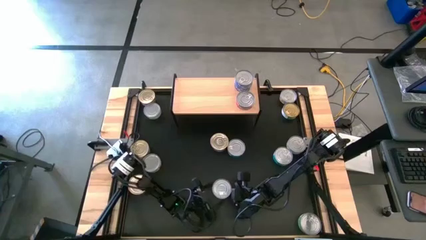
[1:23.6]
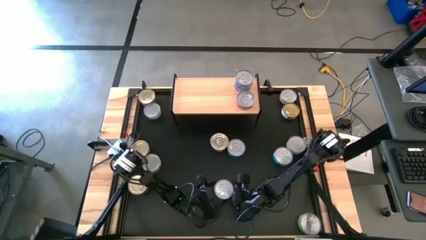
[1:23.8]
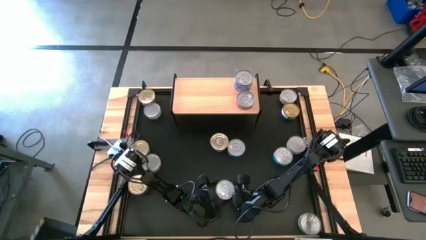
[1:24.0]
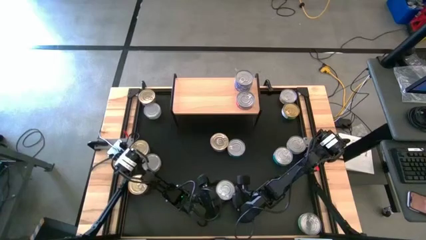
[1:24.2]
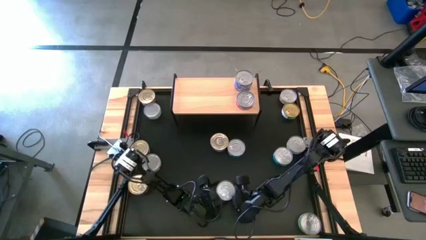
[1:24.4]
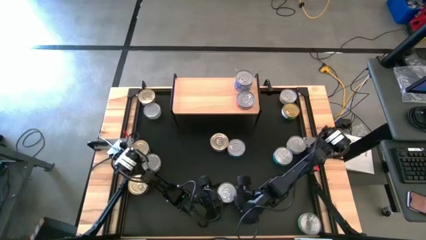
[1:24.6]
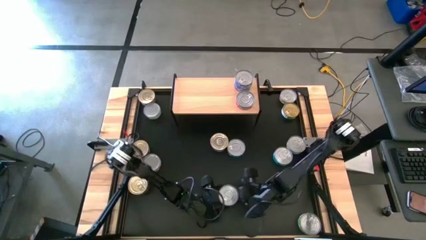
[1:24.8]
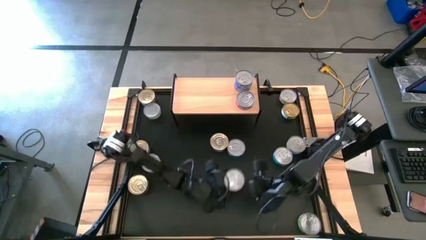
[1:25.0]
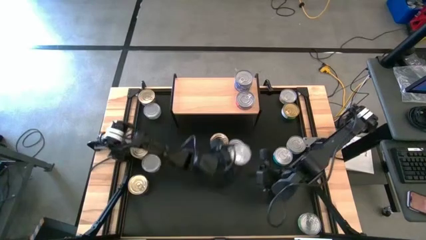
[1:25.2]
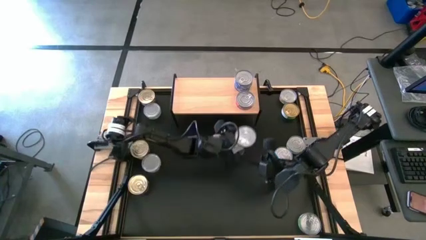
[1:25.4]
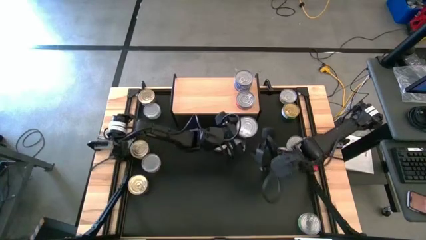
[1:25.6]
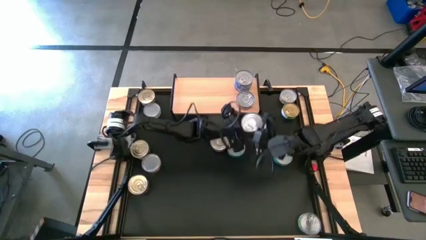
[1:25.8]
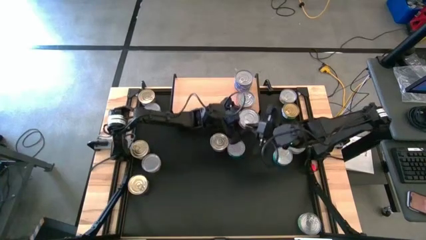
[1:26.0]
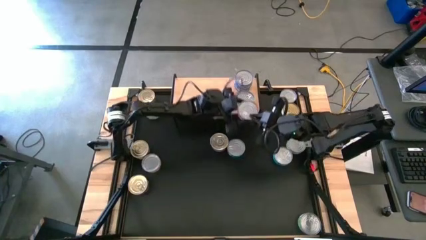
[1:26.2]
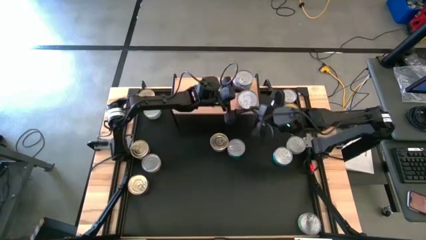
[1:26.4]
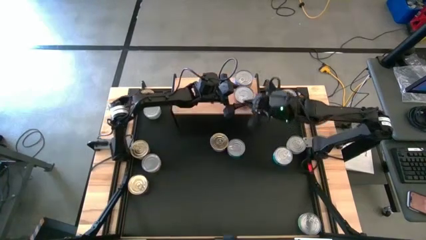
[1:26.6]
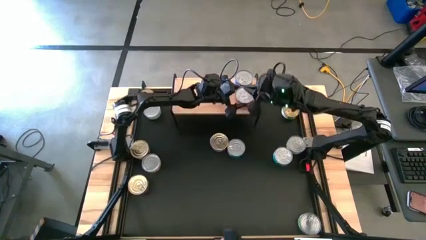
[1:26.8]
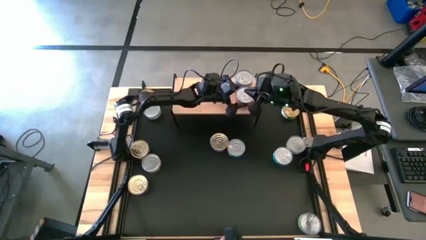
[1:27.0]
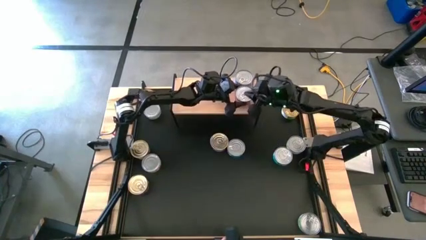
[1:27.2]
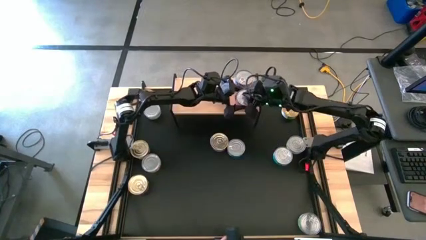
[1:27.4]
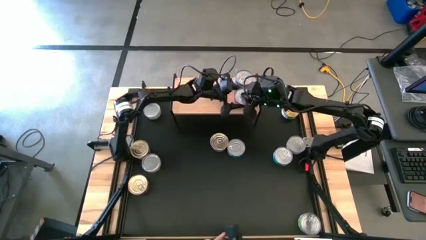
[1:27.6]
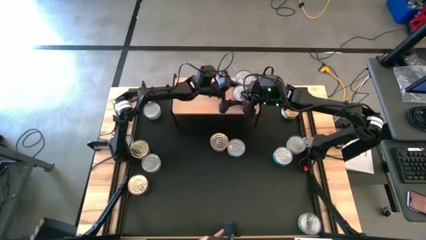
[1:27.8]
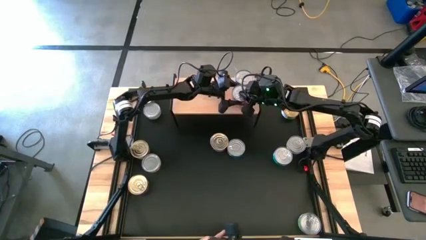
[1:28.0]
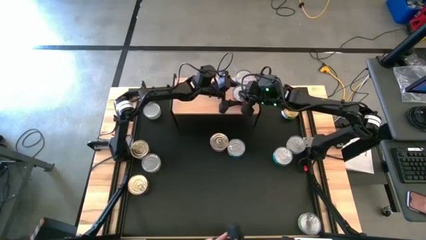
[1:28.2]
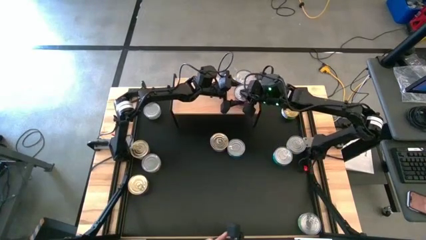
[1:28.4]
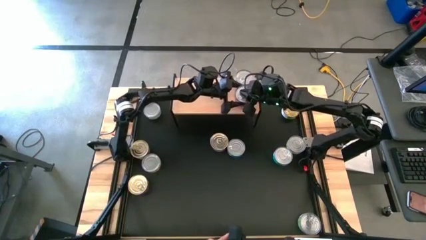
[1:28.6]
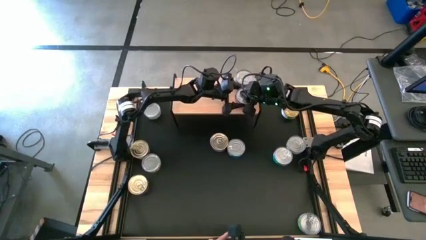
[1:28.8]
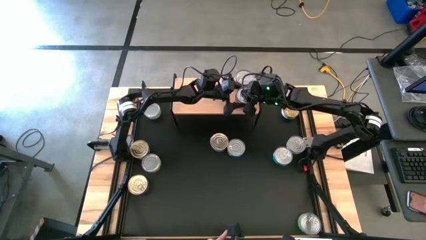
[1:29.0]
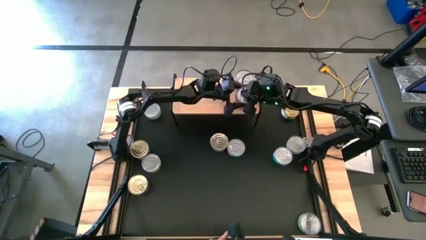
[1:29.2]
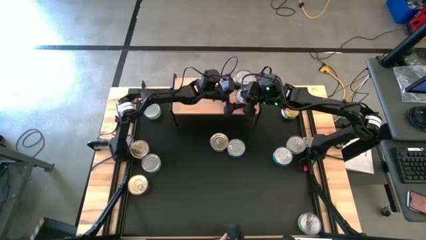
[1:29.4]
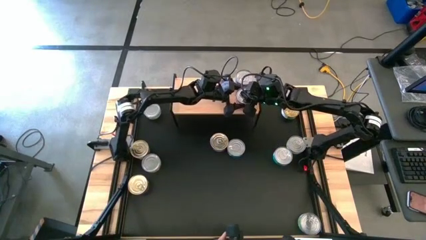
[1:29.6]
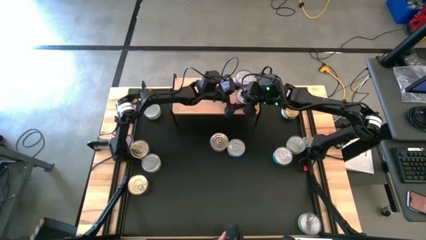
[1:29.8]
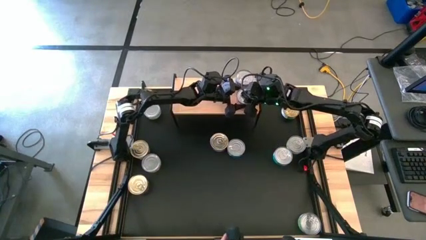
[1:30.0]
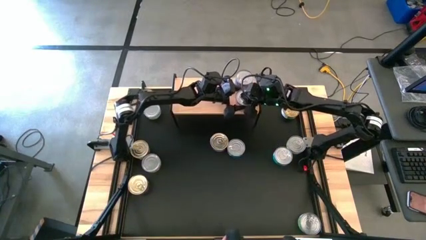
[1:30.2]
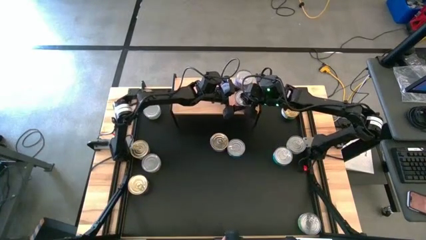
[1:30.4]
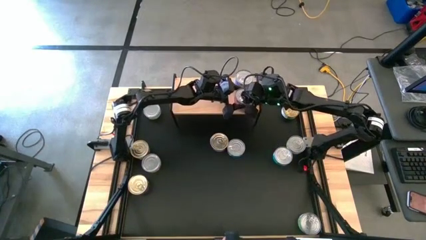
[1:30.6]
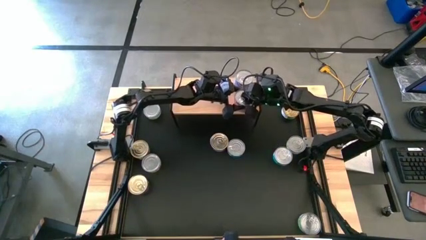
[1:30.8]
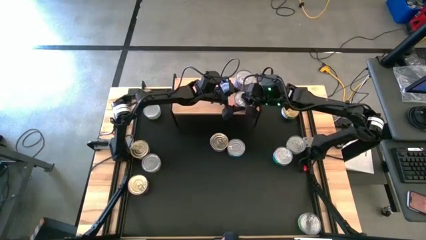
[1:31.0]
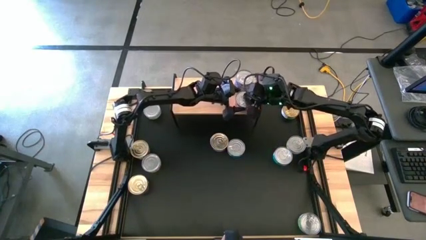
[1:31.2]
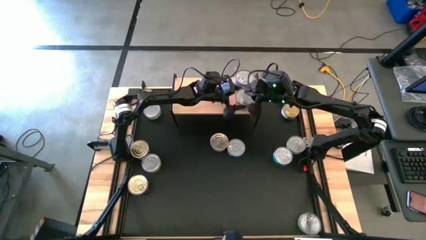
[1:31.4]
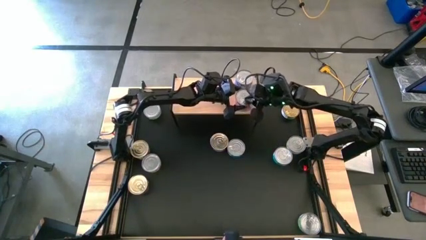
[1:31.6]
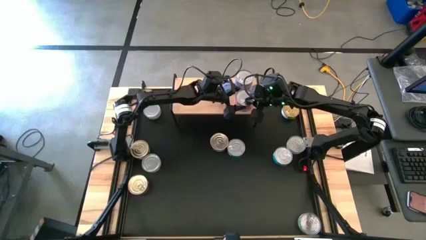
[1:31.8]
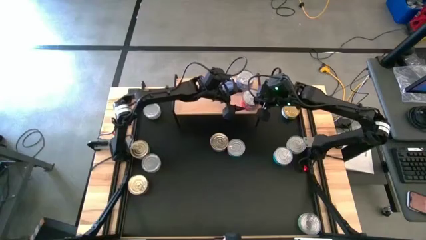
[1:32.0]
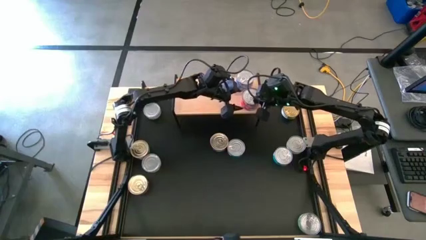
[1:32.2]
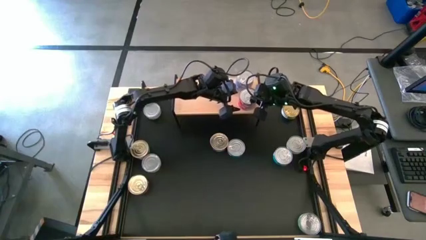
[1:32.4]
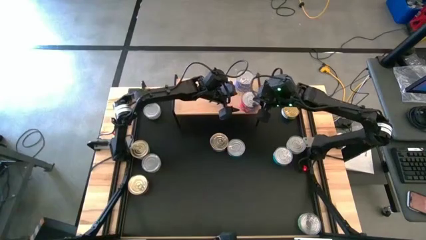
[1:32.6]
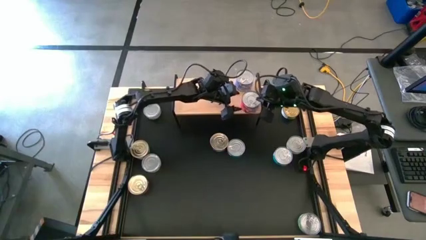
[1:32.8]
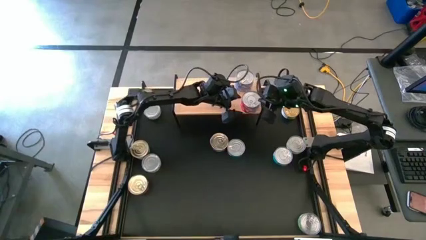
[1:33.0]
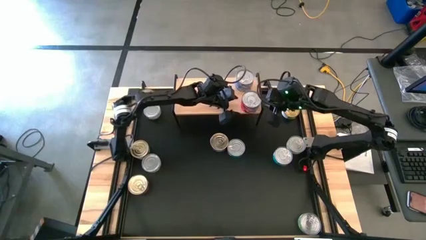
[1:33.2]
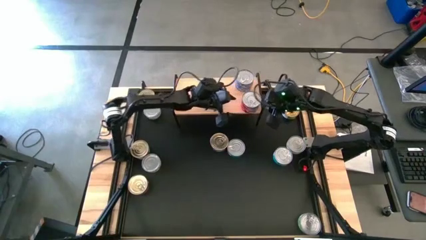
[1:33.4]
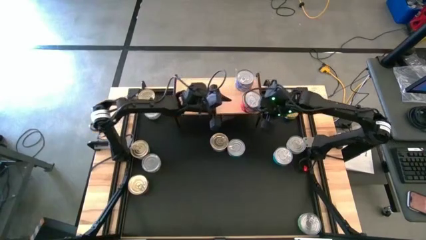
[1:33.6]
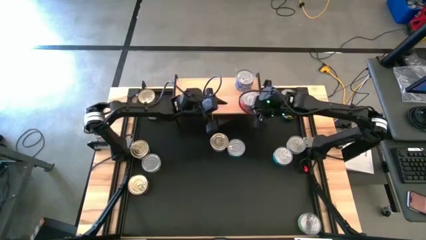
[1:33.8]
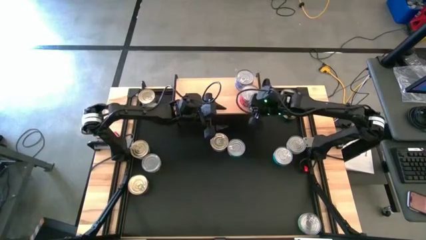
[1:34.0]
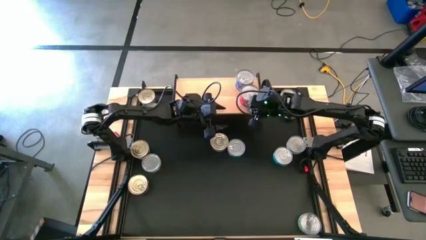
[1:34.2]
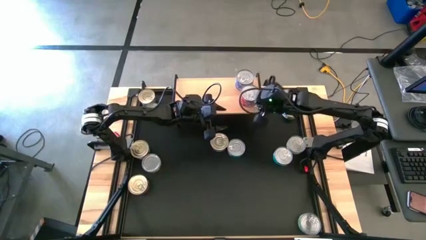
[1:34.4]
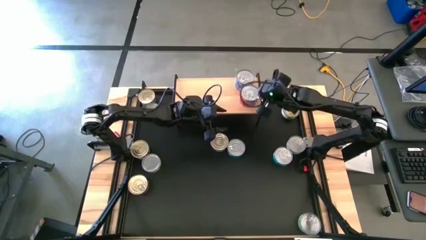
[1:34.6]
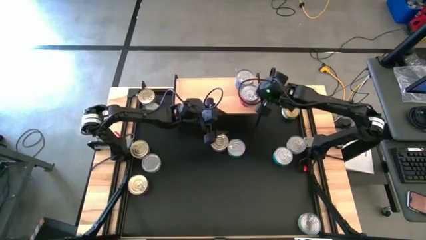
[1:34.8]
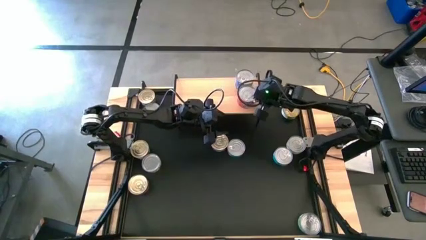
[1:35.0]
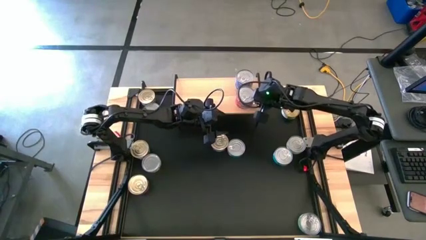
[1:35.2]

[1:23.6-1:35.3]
Task: Stack canned seafood by type on shelf
Stack the red tuna can on top of the other red tuna can on the shelf
